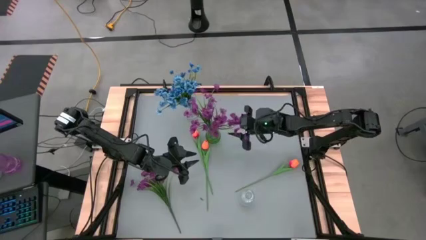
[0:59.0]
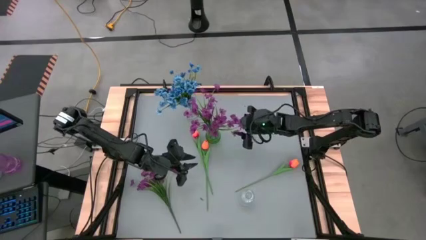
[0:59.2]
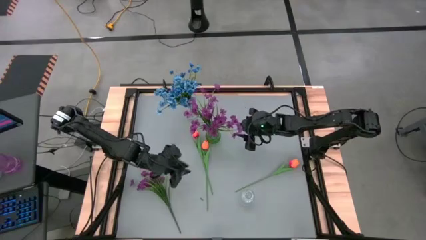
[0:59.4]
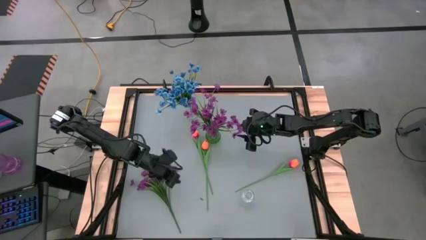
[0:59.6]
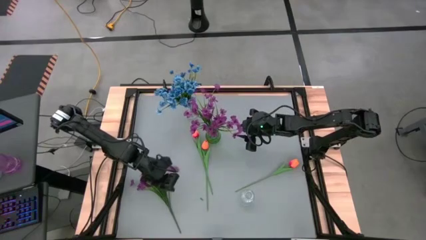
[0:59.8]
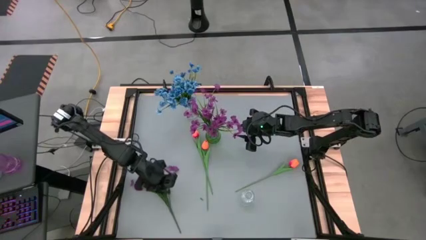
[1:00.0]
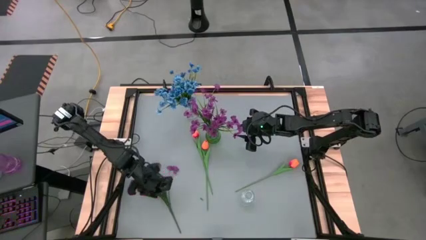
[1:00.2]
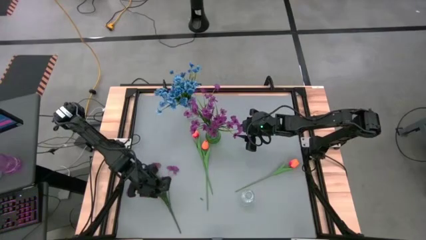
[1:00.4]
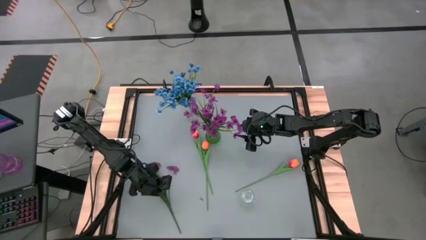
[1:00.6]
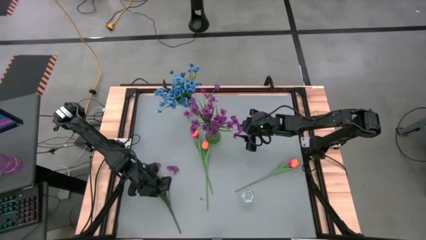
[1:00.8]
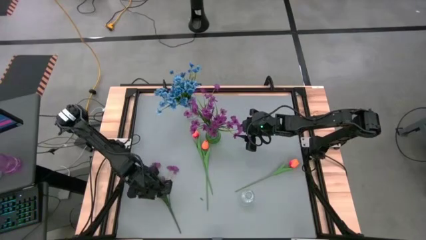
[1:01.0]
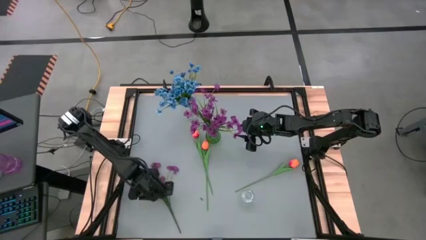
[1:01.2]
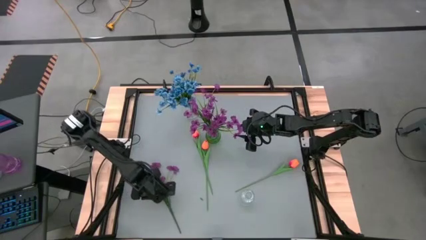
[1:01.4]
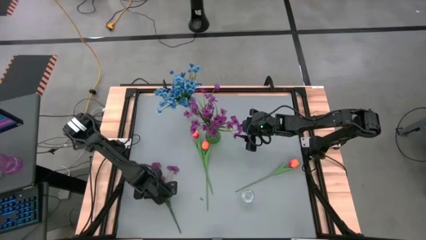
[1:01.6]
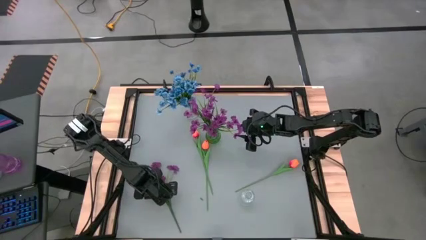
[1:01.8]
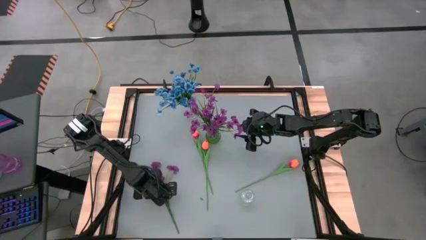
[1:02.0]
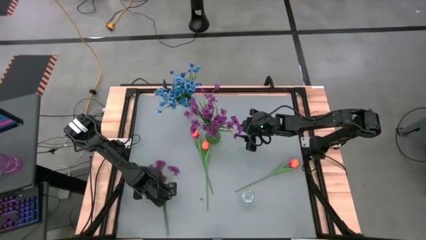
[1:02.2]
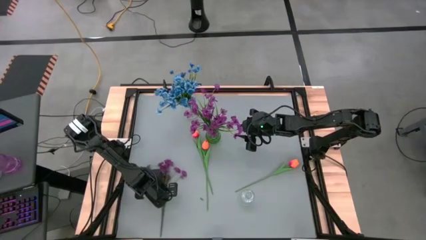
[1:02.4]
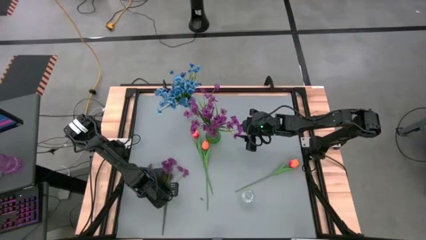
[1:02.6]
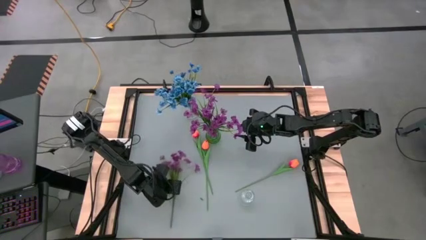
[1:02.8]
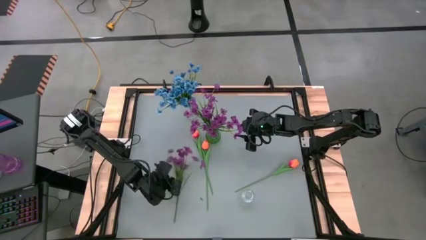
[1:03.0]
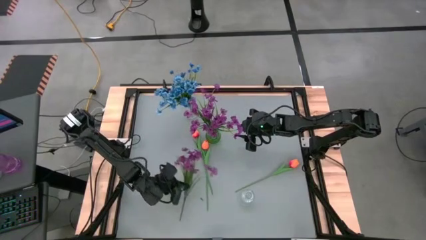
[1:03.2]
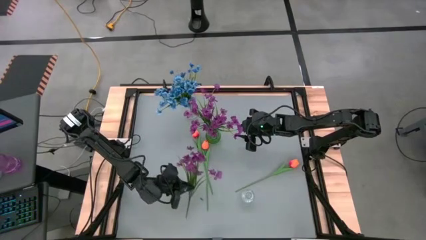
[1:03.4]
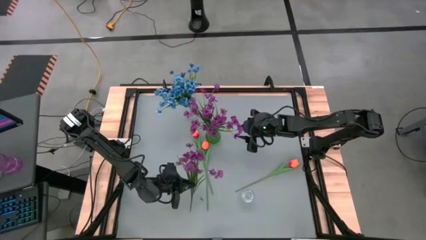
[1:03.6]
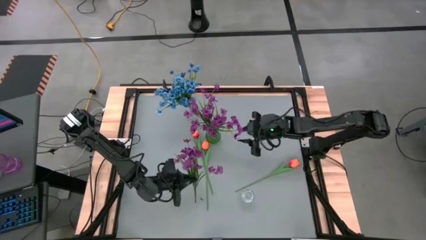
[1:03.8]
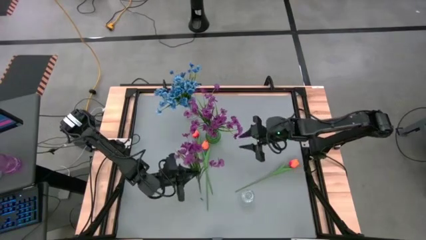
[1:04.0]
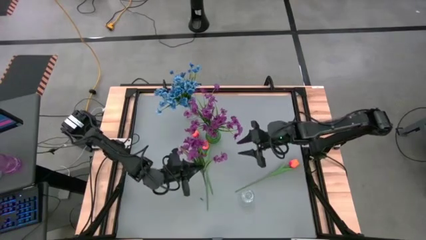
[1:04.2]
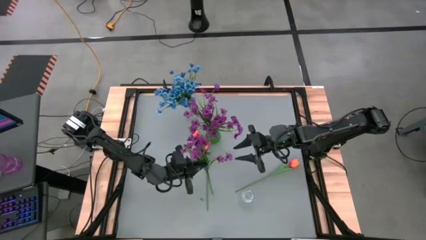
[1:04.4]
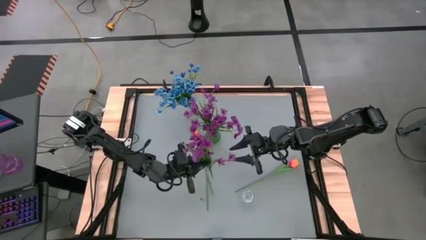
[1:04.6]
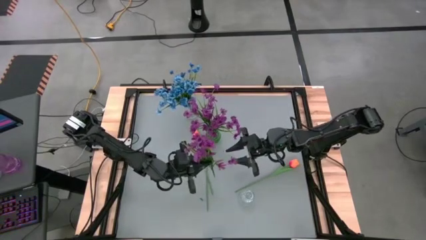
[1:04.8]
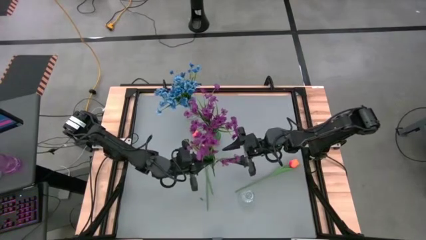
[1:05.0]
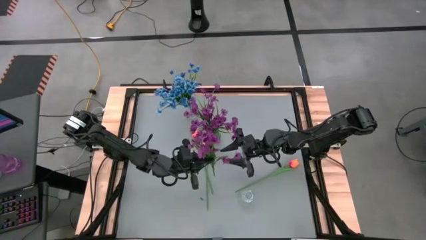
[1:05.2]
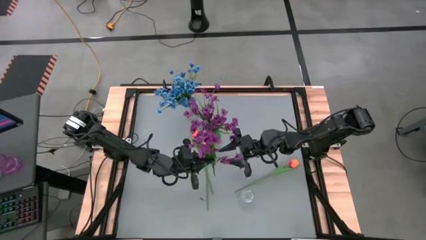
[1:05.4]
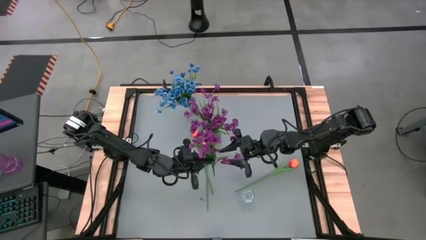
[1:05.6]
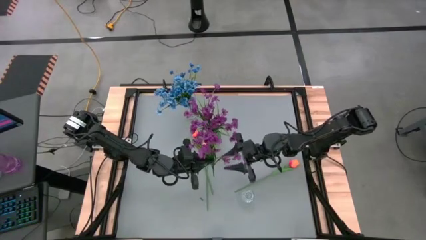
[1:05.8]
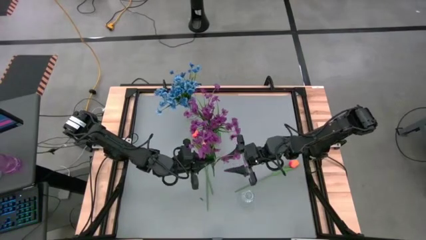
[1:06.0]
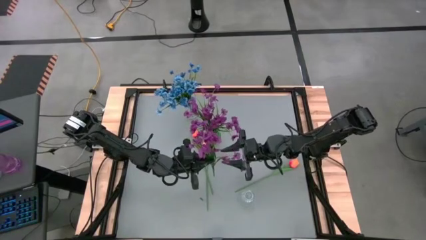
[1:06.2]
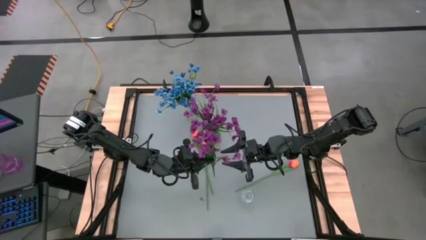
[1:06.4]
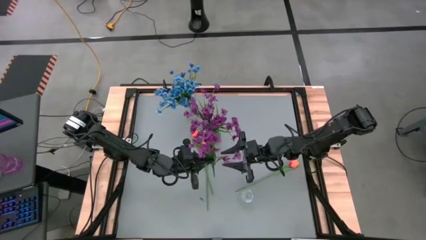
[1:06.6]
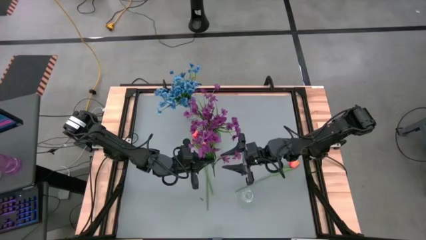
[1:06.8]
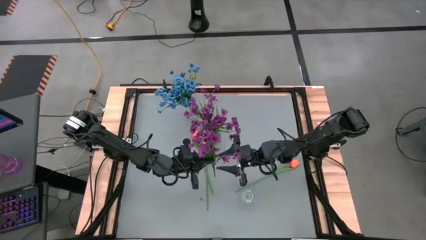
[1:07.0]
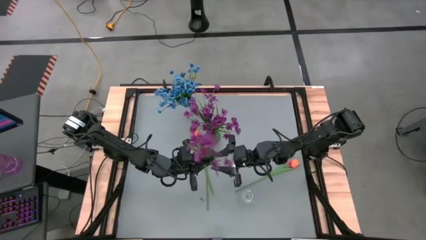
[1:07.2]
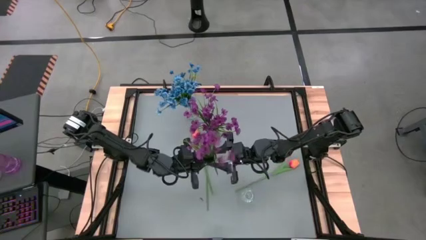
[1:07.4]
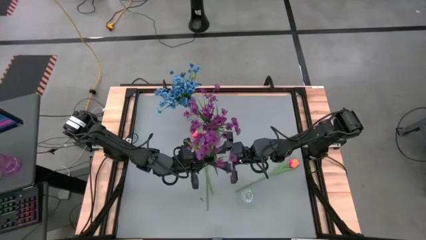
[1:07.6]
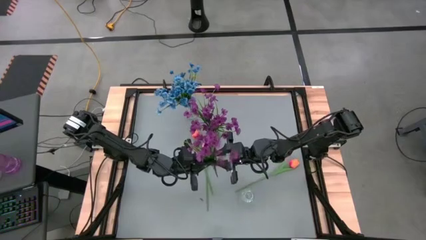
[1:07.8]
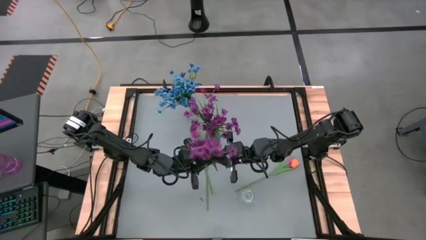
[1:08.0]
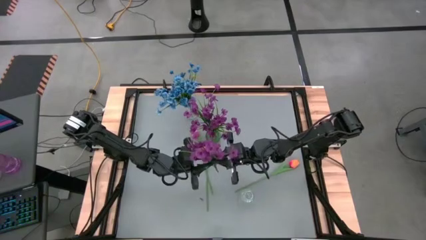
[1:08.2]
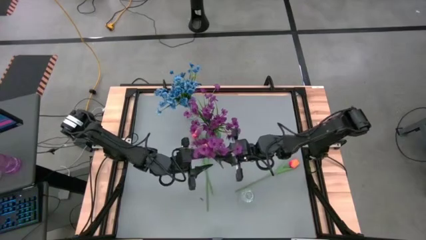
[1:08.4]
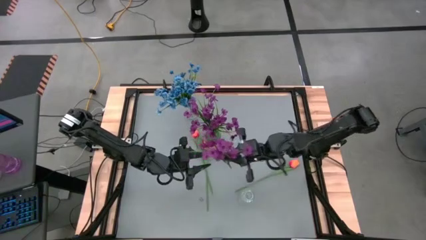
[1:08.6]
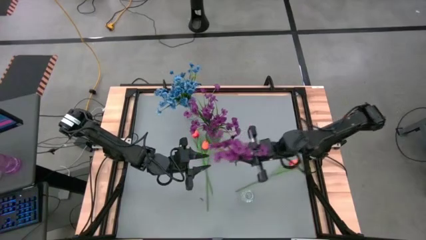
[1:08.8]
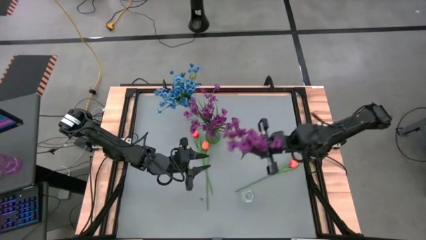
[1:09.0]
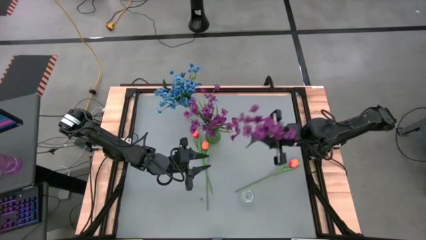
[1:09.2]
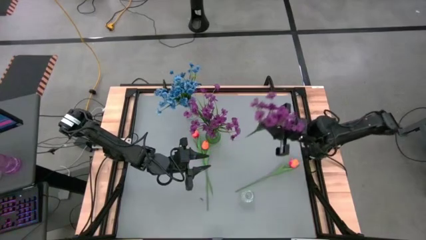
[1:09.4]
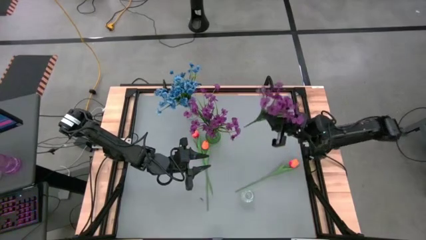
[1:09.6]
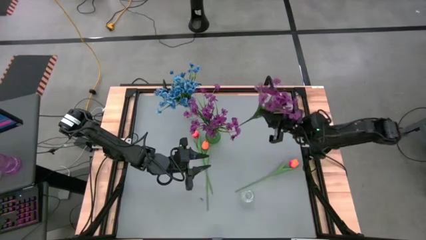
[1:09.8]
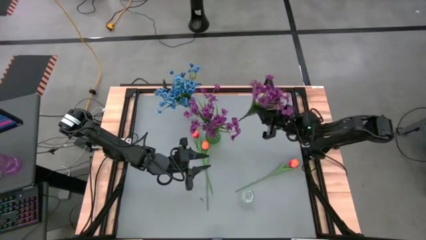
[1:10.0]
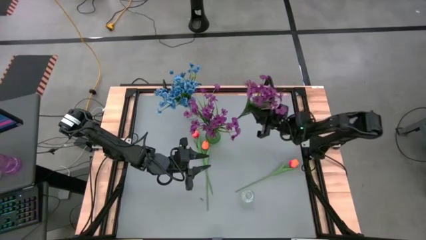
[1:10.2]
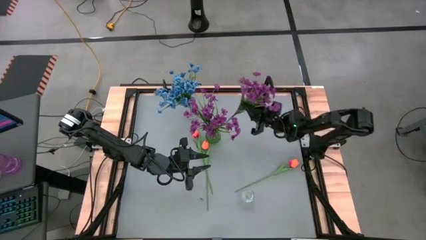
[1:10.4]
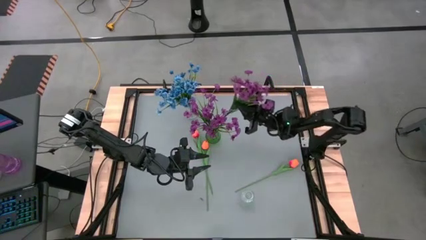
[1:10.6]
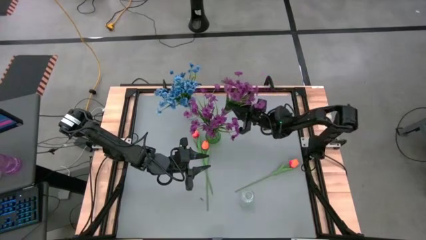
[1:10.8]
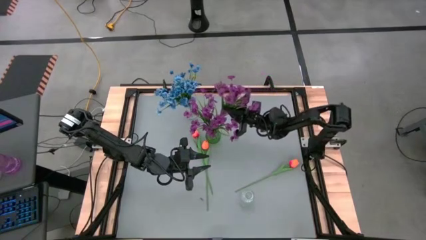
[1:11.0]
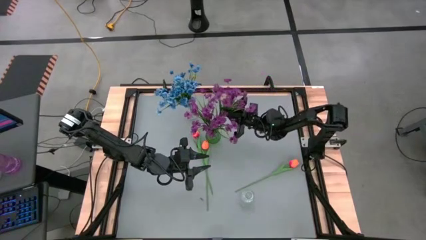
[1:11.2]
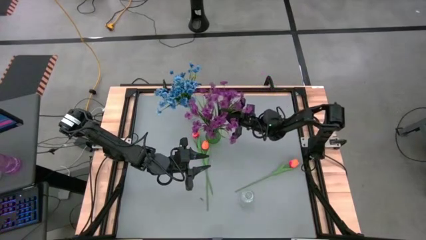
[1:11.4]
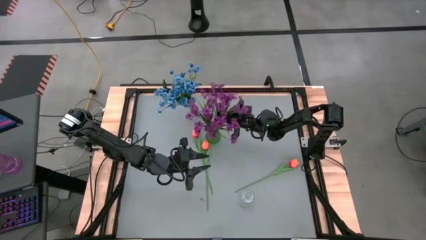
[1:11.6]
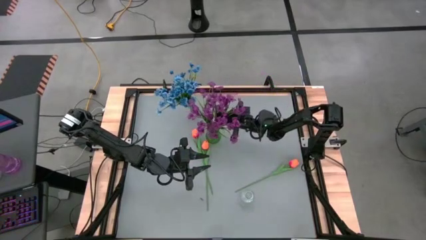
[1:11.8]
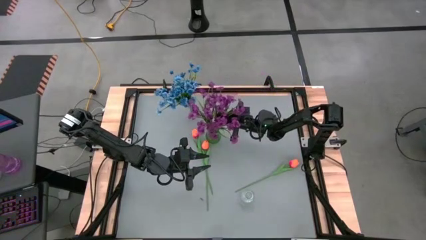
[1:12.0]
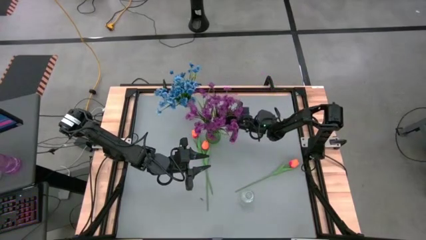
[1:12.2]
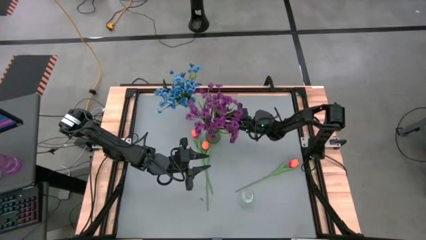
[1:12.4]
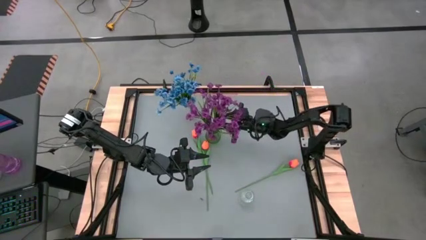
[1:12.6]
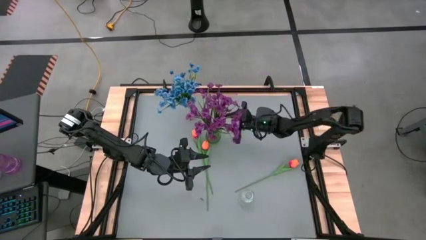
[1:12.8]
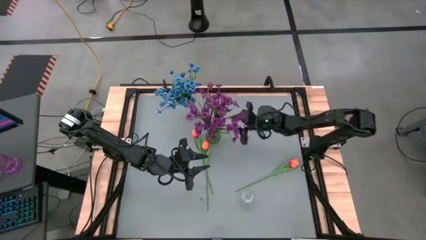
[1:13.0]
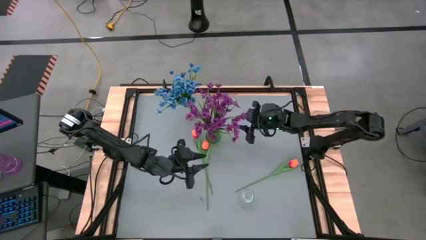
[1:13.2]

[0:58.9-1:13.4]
Task: Sort flowers into vase by color
Put the violet flowers into the green vase
